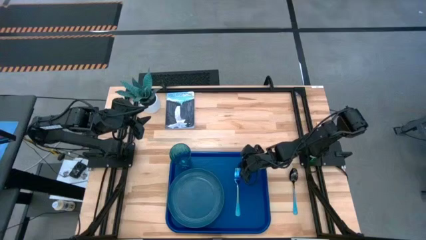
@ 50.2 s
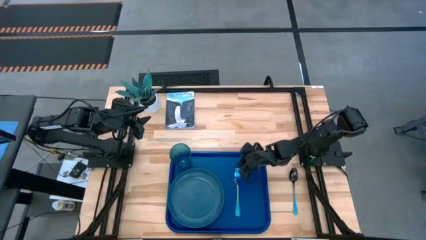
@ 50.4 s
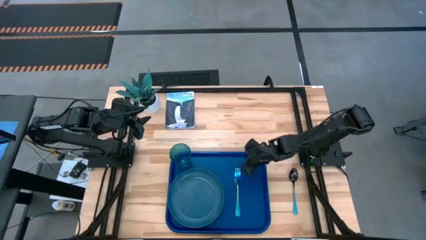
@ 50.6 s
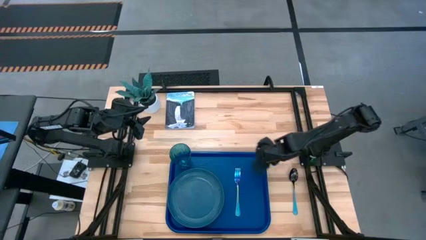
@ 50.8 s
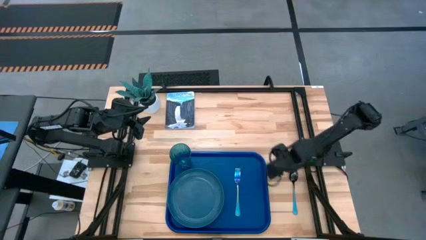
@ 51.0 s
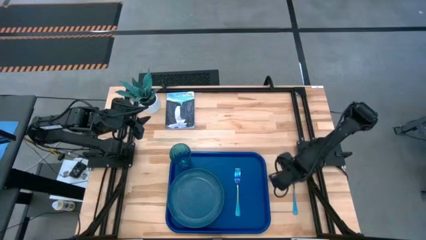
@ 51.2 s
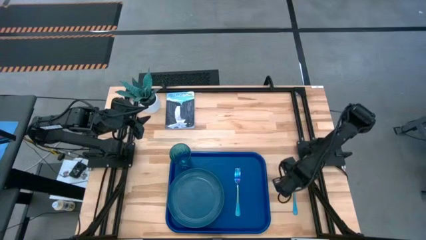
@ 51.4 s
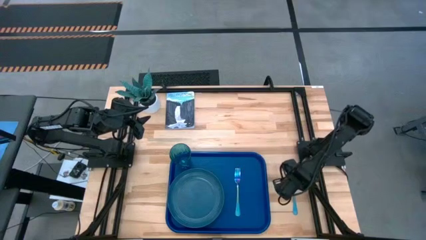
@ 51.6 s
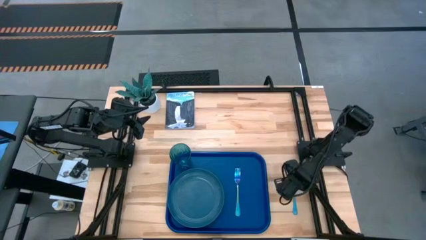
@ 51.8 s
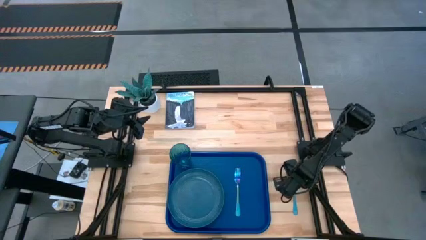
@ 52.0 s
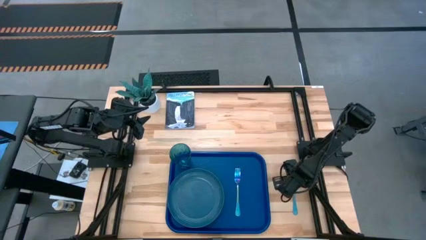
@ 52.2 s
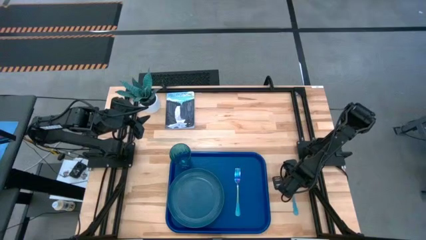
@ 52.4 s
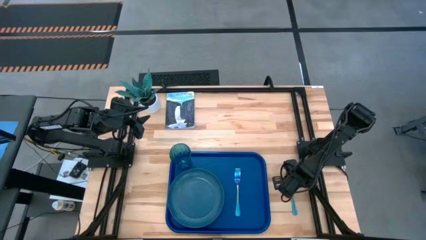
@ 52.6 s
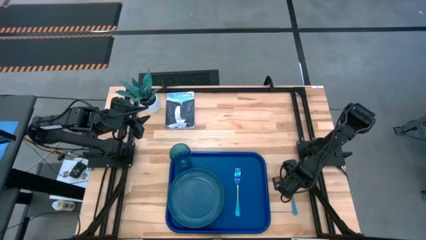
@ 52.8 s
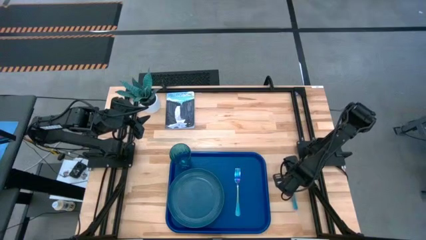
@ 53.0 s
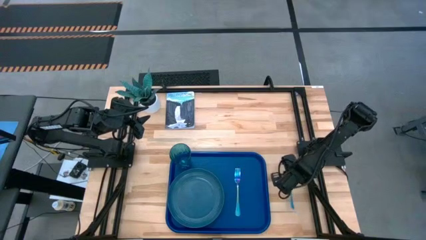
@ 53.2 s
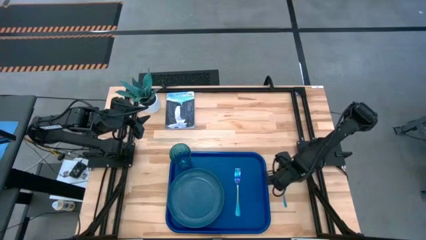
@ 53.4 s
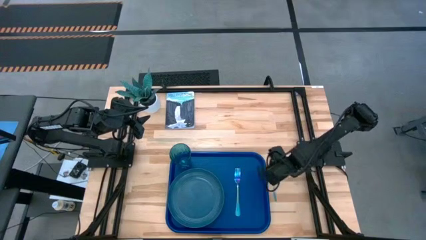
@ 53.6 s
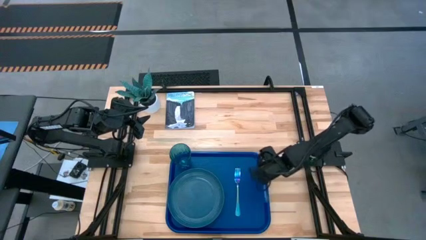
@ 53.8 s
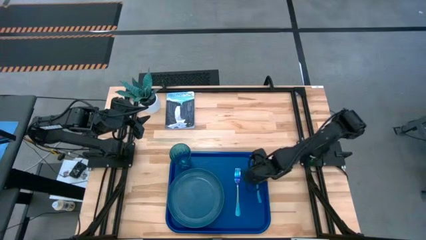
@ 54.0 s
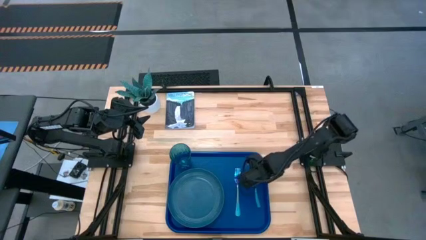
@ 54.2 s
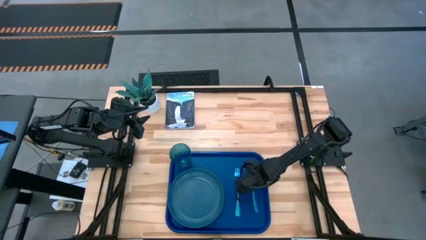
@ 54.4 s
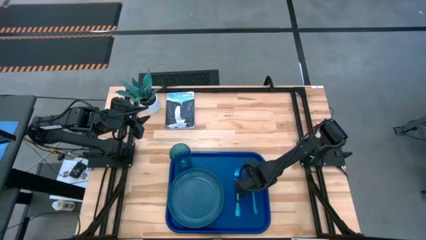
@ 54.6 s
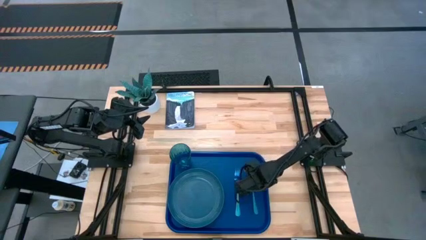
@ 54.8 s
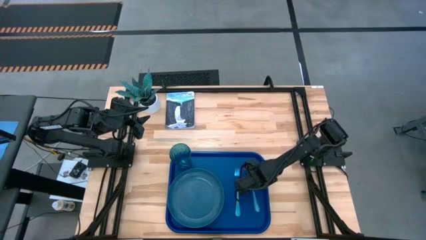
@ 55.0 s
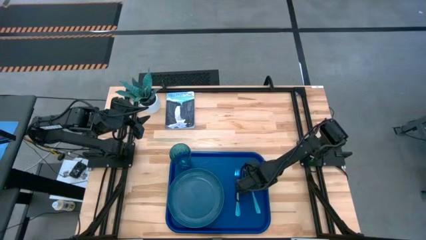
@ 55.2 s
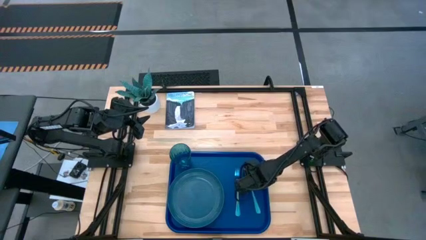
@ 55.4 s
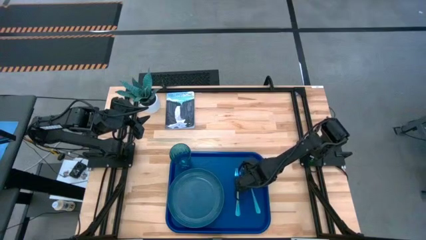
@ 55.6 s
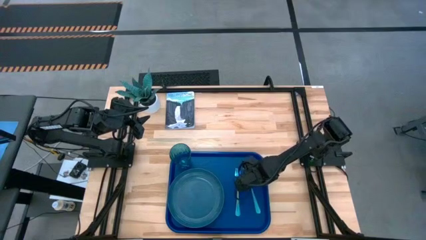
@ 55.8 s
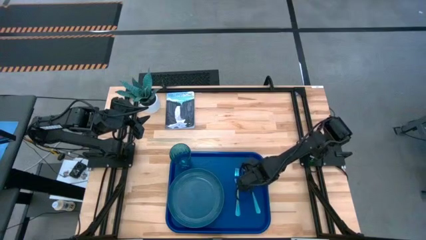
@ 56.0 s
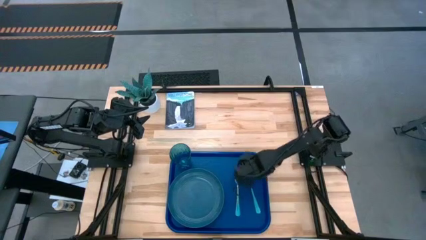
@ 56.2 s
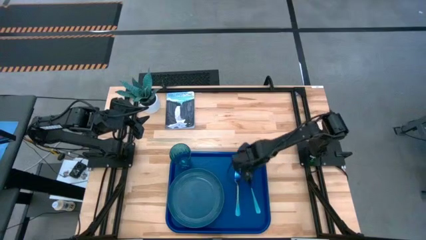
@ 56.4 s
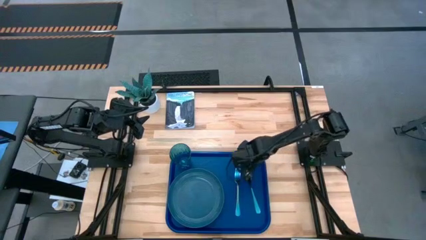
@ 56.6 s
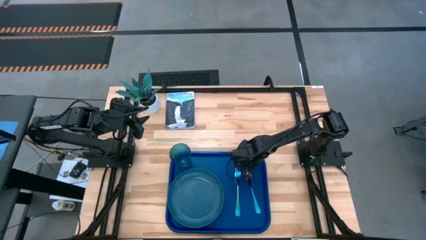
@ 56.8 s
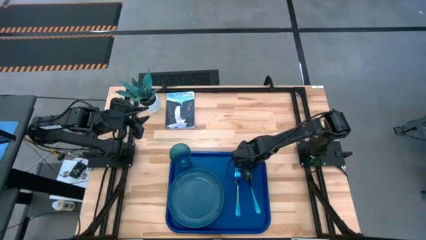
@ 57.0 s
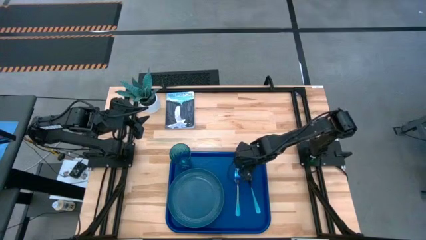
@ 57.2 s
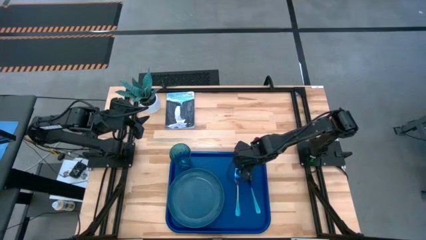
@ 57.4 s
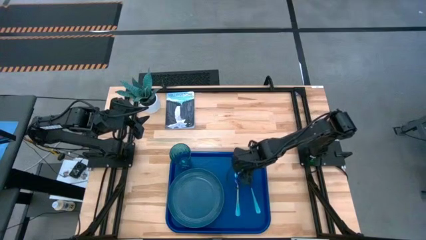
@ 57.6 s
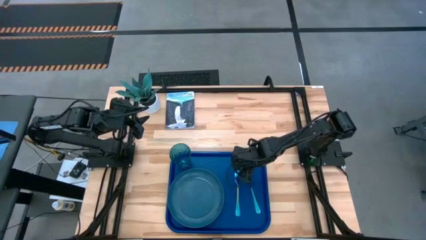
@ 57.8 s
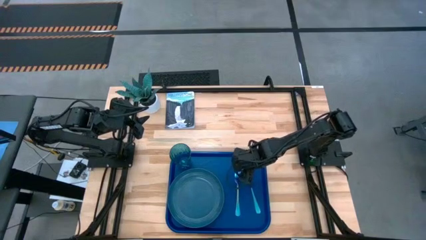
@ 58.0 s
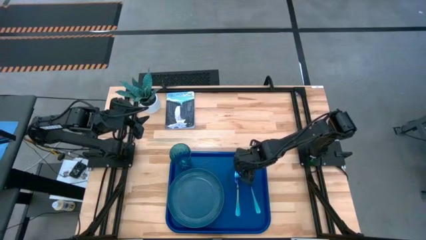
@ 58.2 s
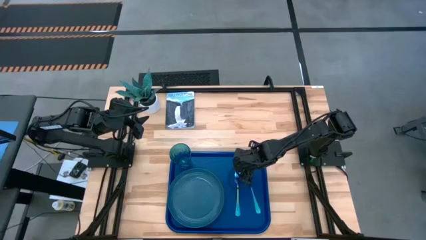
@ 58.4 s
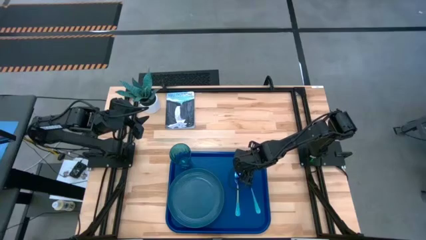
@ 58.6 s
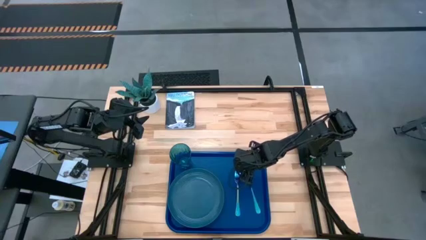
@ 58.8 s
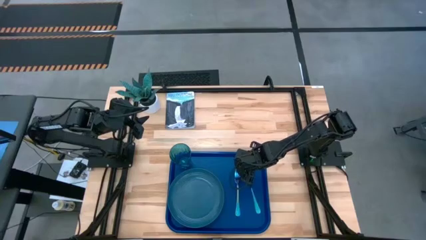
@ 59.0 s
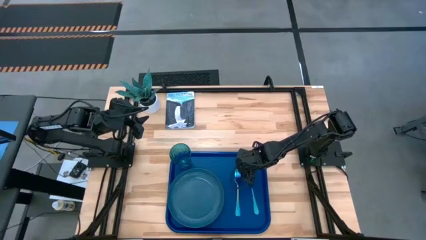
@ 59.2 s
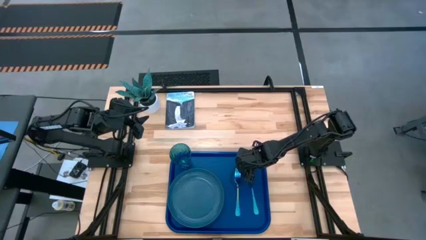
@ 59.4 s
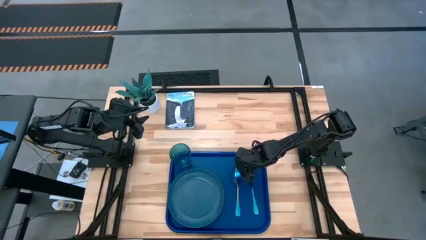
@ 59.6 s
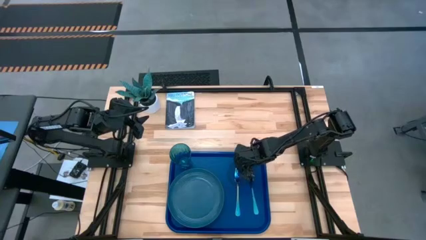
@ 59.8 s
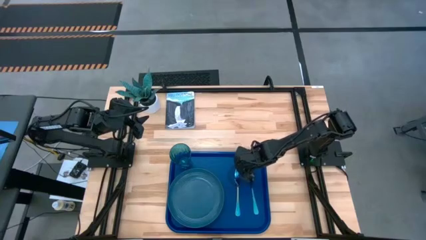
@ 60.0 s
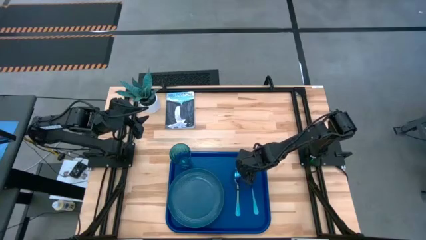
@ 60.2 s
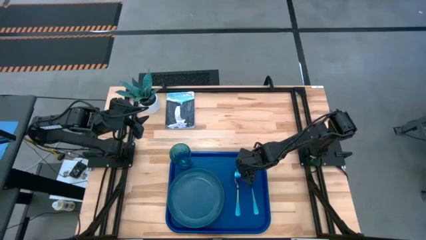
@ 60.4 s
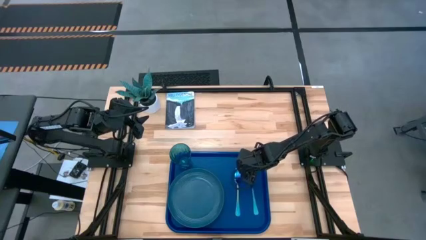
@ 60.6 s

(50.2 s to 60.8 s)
Task: Pick and place plate/cup/fork/spoon on tray
Put the blue spoon on the blue serving tray to the right of the blue fork
